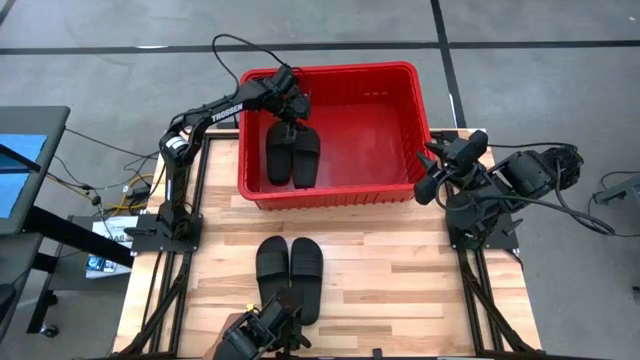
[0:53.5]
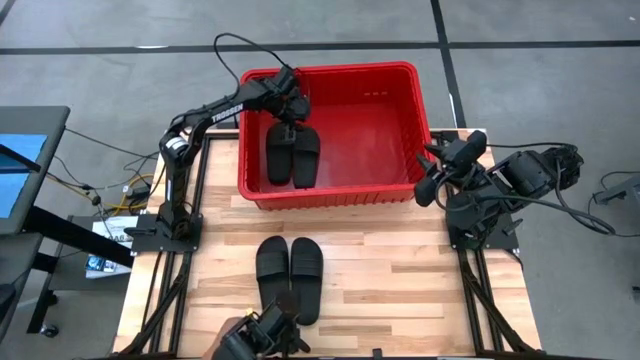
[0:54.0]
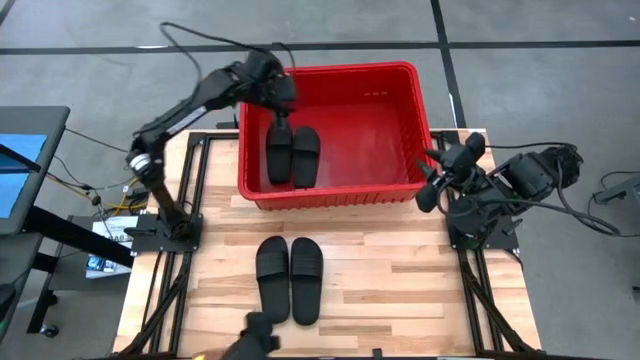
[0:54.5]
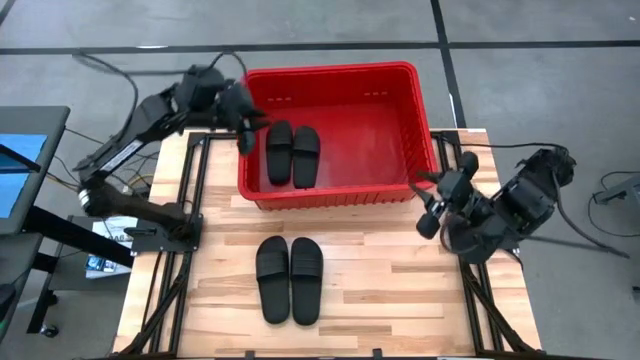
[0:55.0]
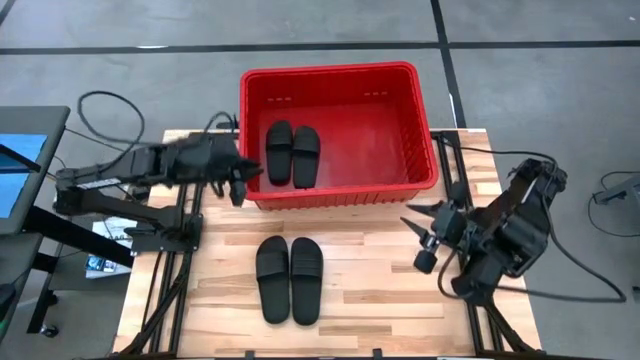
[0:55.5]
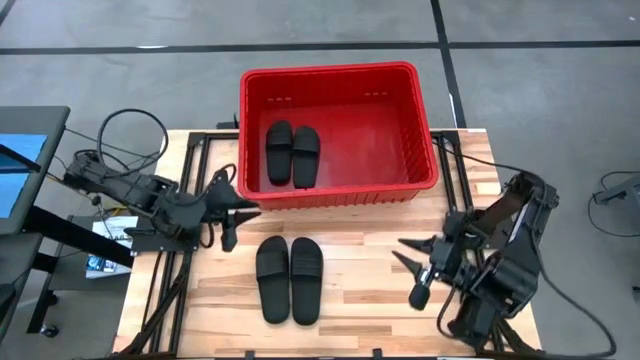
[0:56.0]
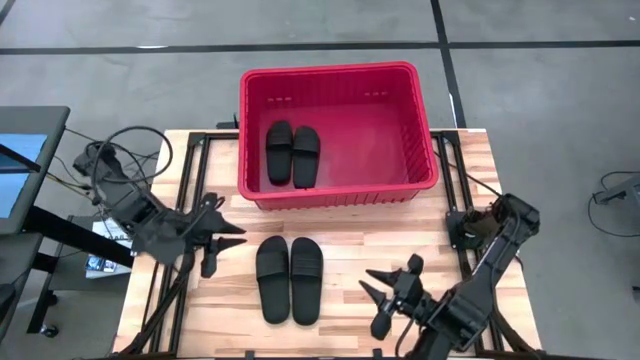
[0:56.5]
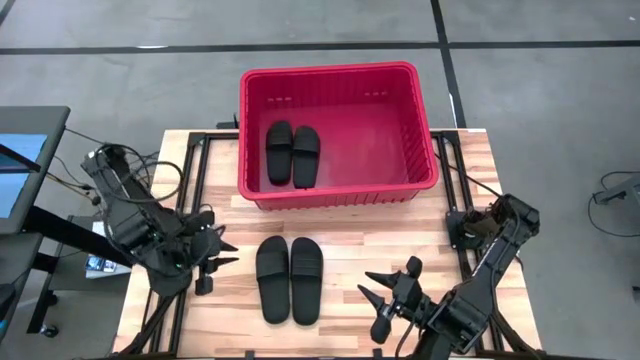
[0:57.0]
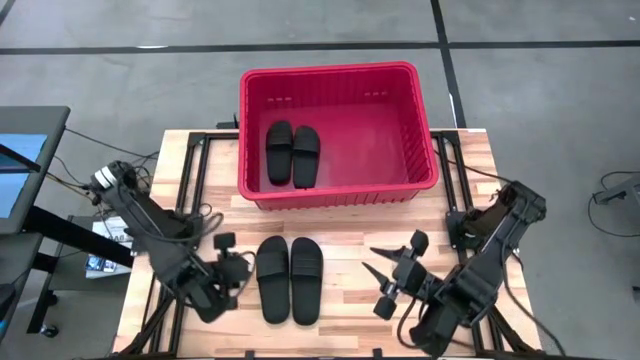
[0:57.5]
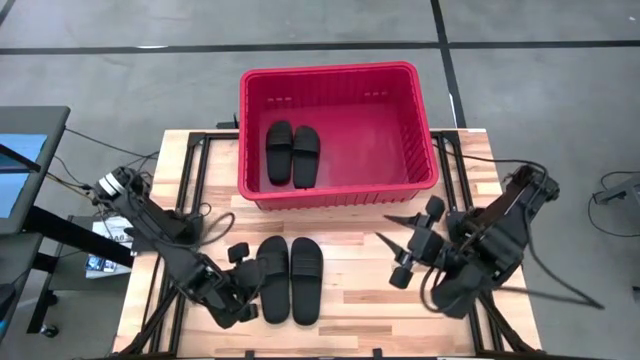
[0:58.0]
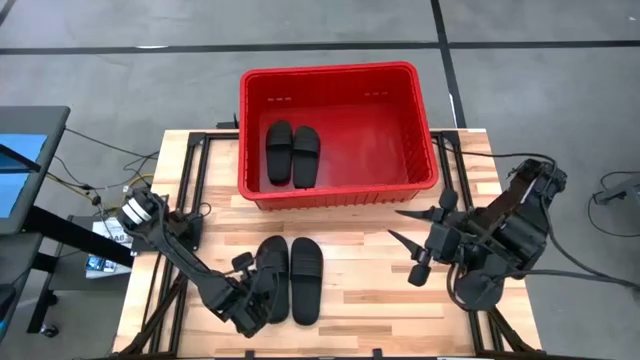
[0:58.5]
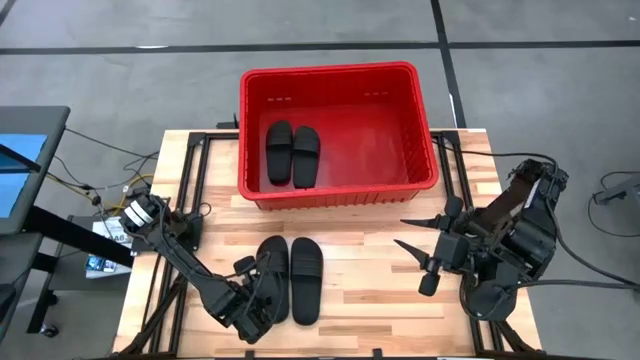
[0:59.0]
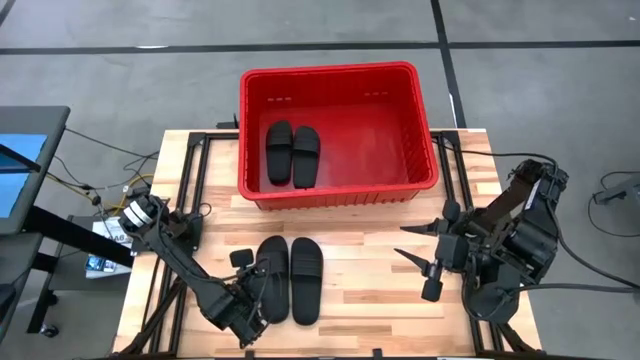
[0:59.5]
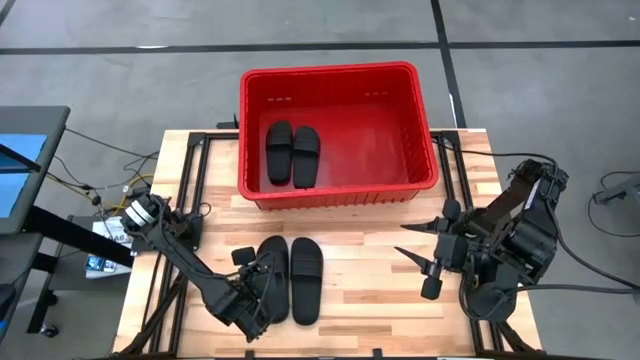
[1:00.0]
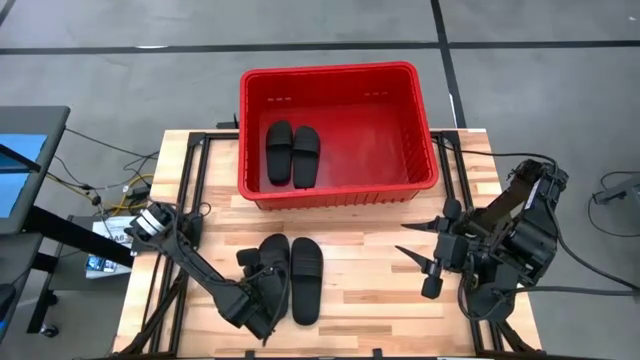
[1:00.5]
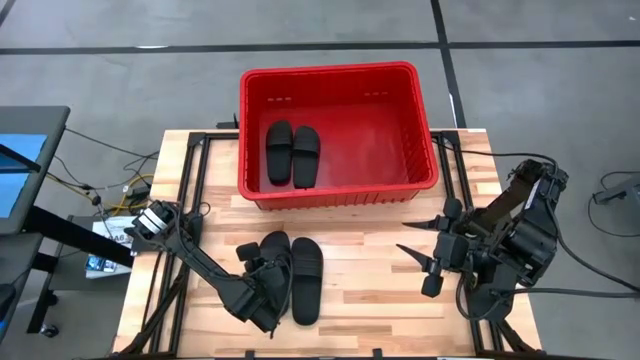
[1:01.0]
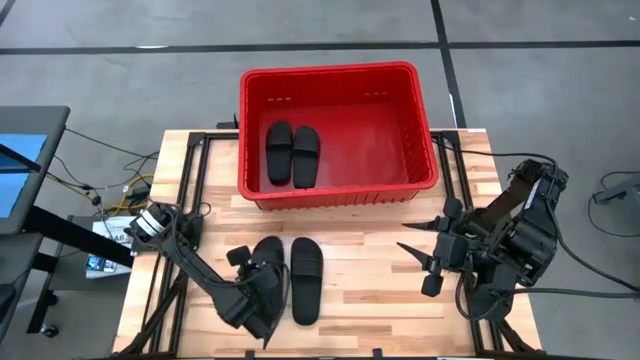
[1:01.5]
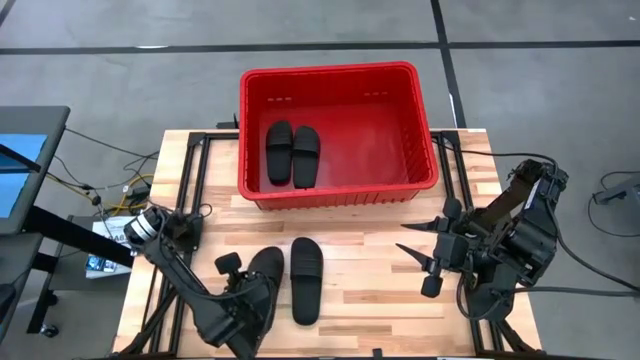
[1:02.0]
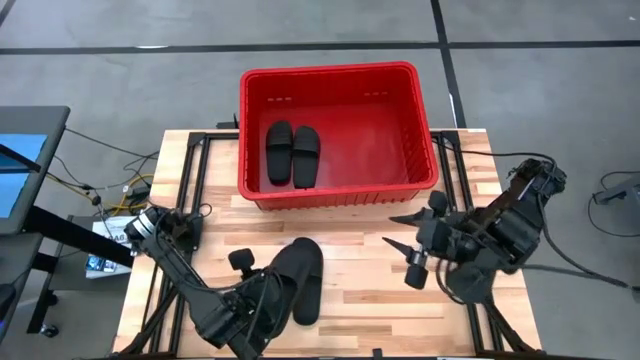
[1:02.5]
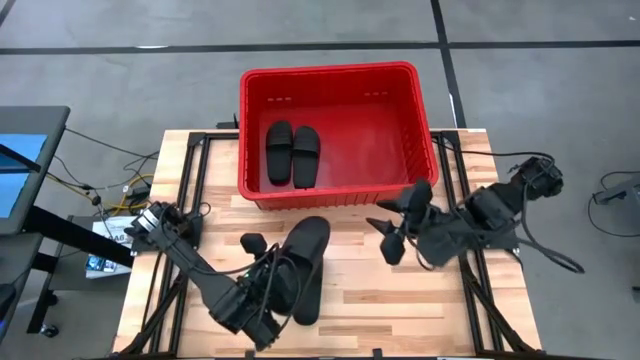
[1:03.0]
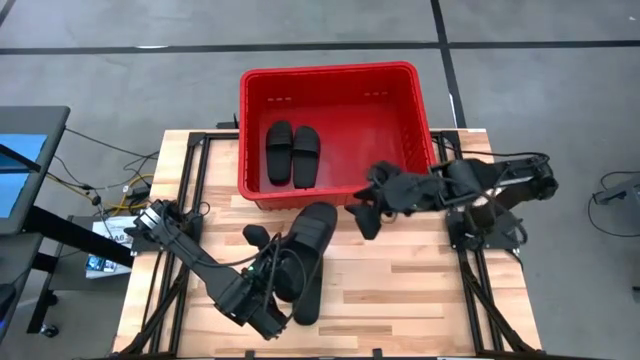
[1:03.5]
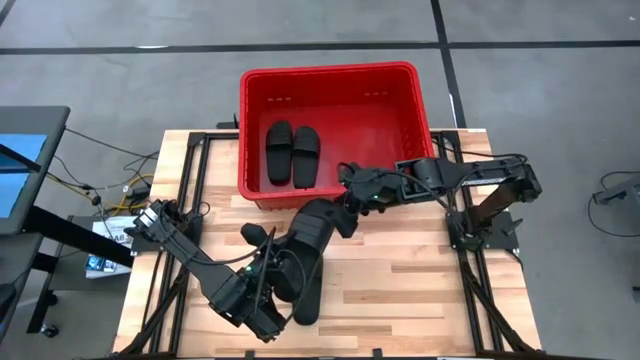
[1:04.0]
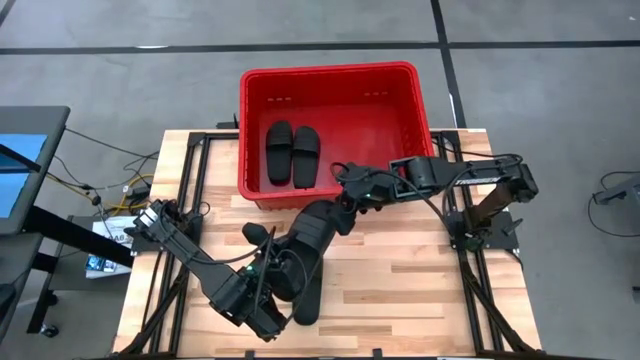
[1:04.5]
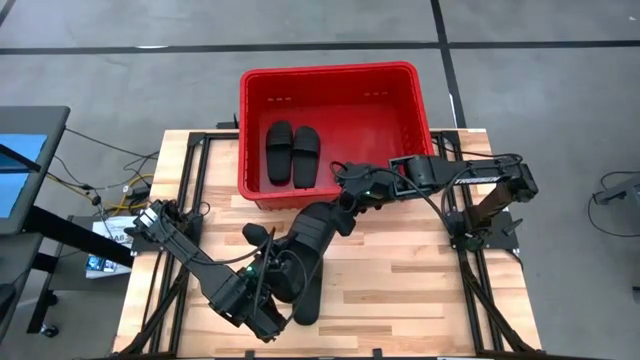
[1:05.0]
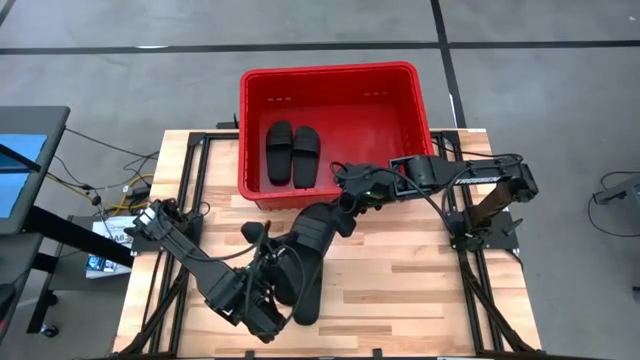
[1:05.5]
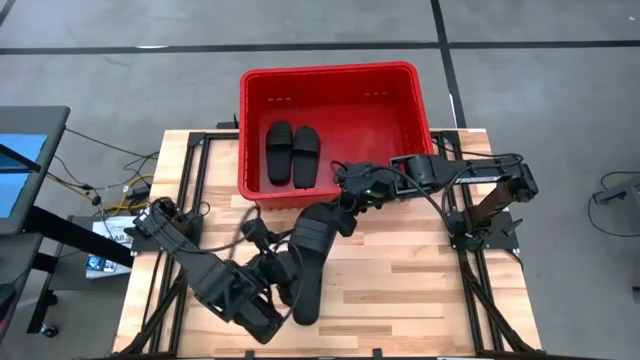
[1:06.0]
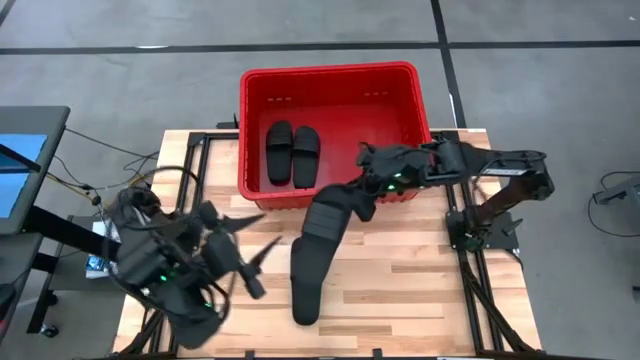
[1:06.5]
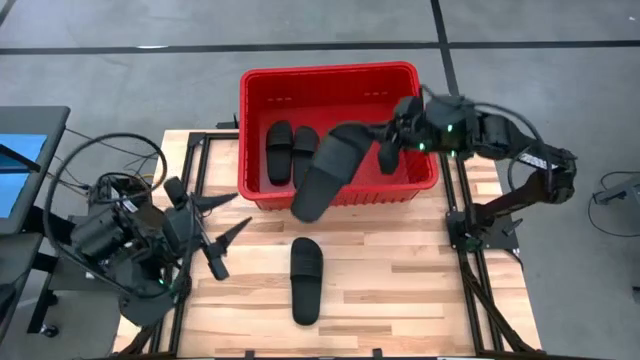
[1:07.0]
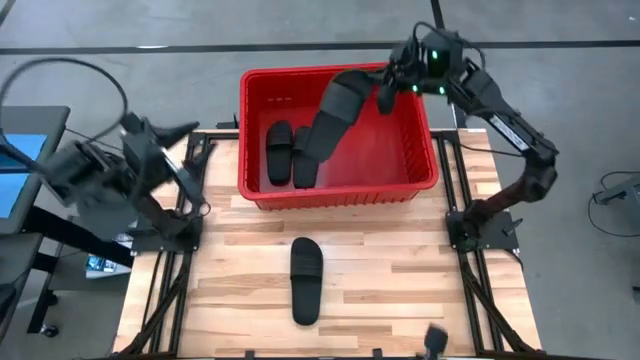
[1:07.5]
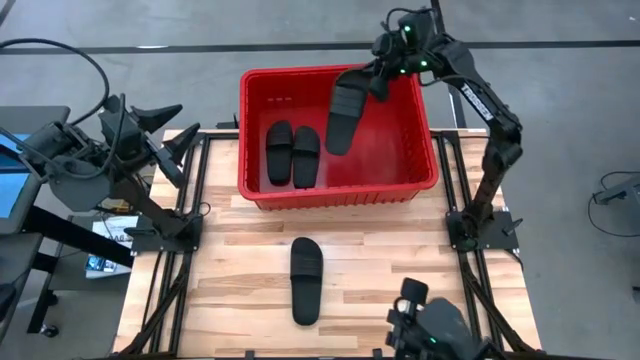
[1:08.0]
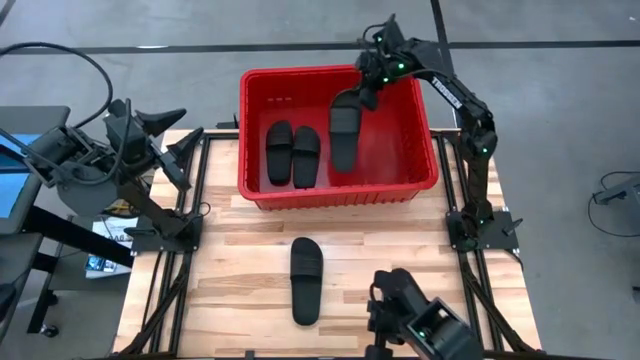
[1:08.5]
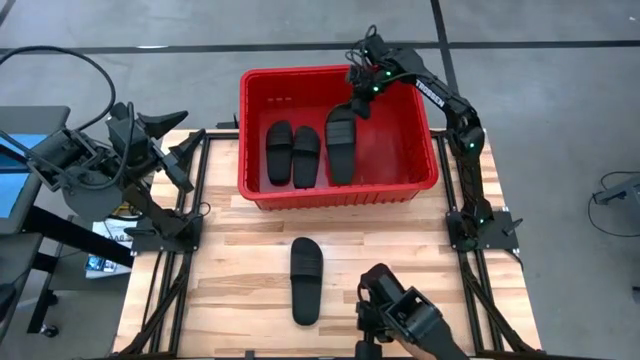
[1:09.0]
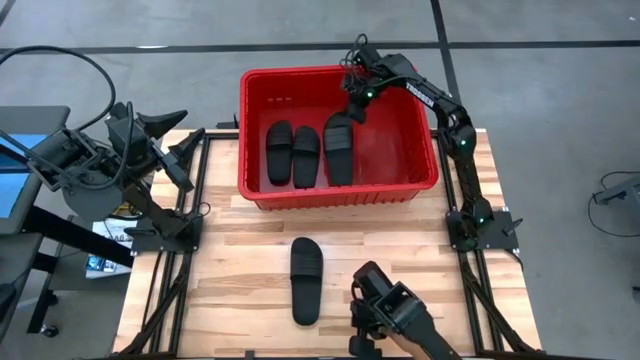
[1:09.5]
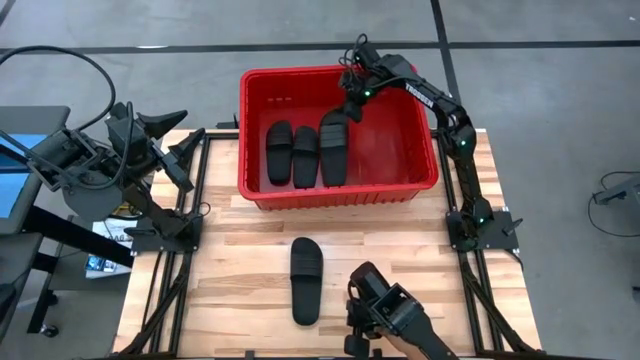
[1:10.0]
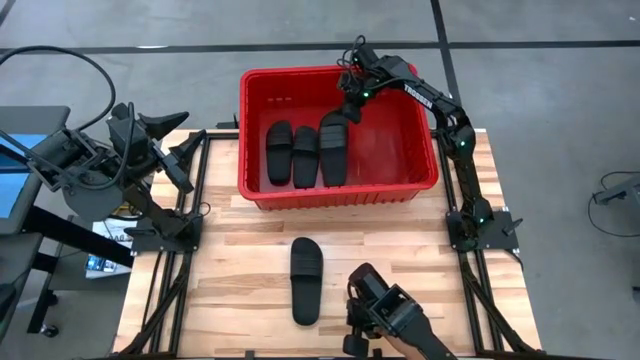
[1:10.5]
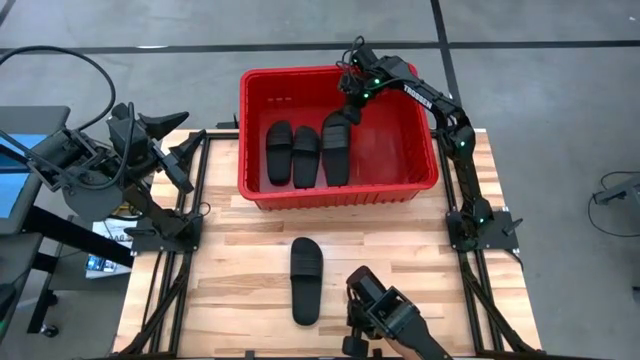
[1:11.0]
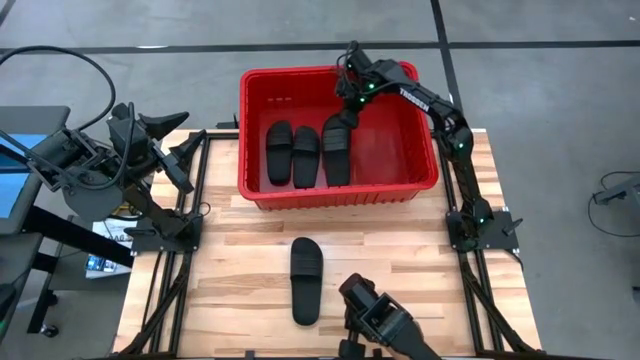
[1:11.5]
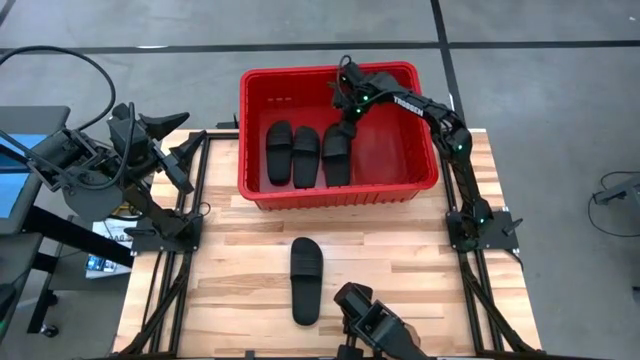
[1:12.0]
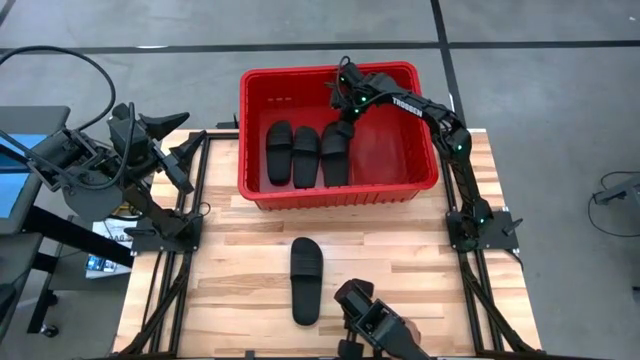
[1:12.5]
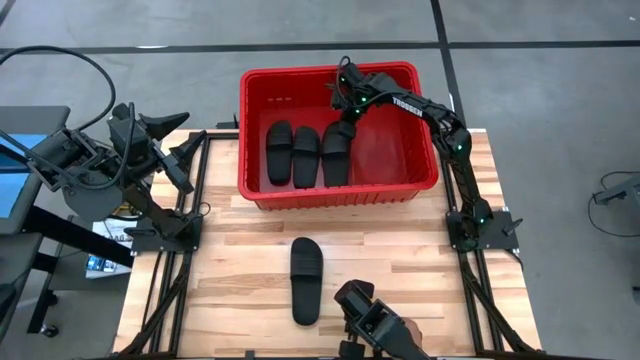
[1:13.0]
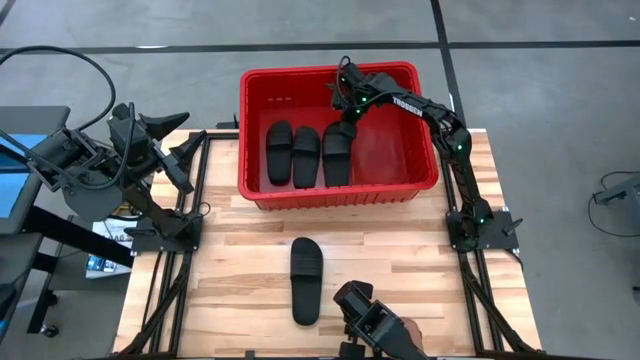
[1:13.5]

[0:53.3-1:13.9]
Task: Pick and place slides into bin
Put the black slide into the red organizer bin
